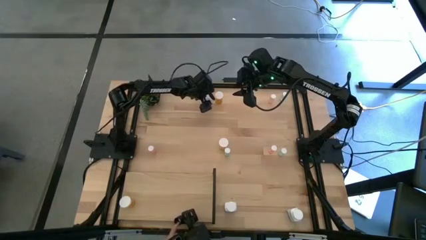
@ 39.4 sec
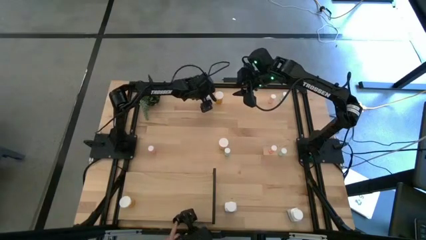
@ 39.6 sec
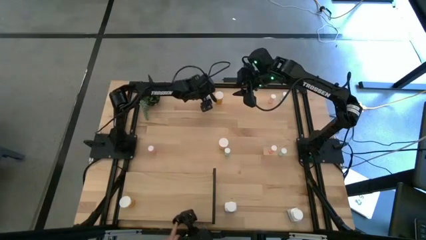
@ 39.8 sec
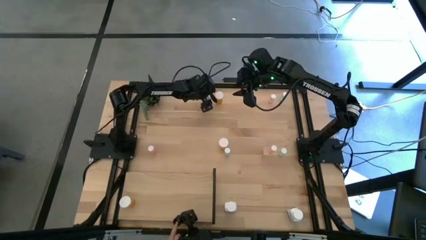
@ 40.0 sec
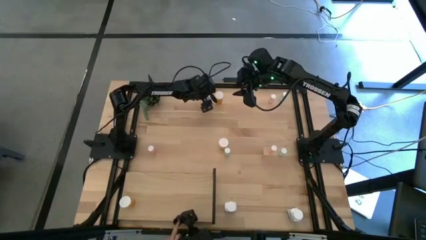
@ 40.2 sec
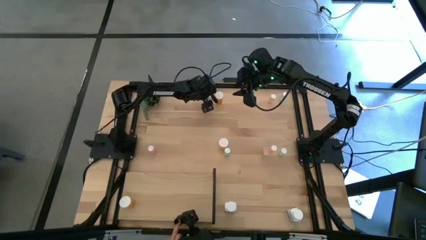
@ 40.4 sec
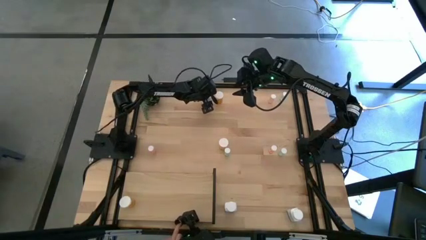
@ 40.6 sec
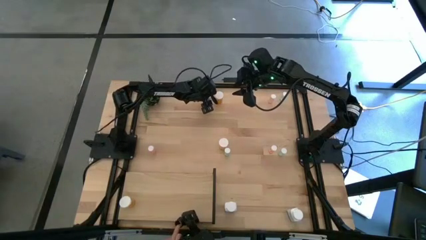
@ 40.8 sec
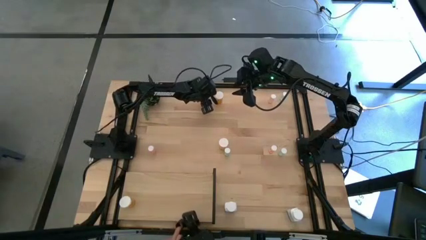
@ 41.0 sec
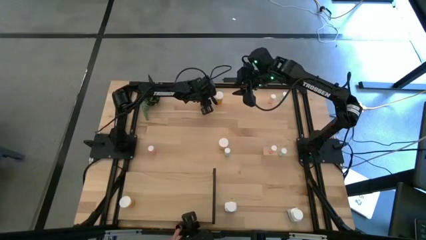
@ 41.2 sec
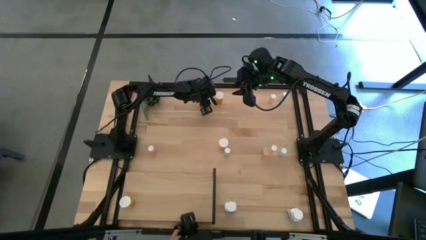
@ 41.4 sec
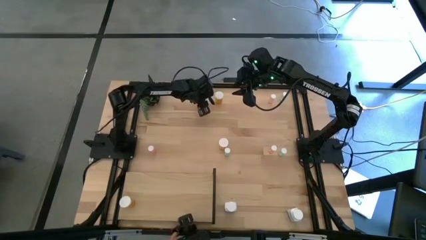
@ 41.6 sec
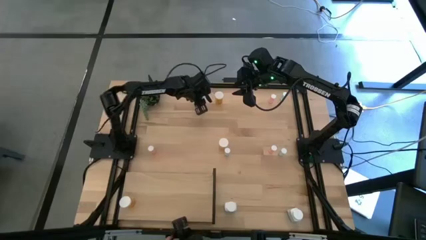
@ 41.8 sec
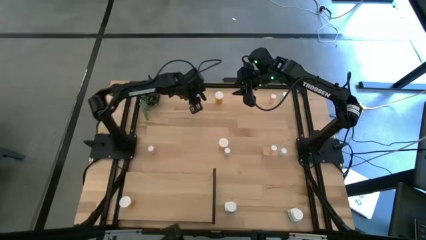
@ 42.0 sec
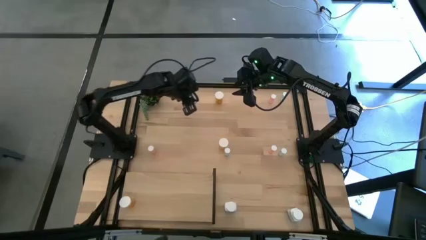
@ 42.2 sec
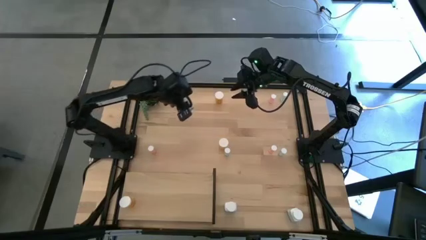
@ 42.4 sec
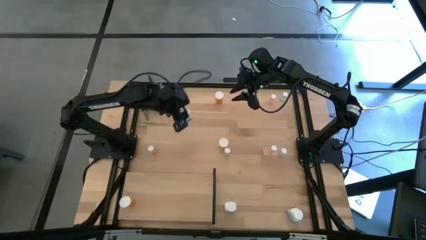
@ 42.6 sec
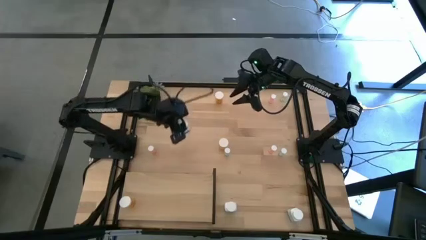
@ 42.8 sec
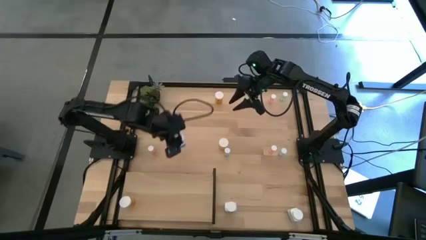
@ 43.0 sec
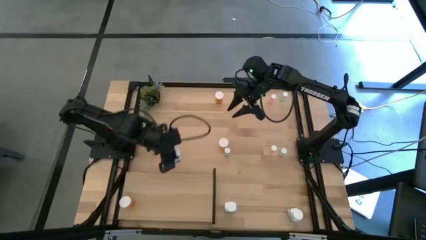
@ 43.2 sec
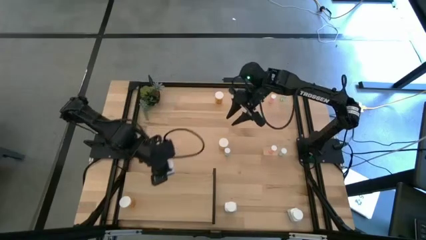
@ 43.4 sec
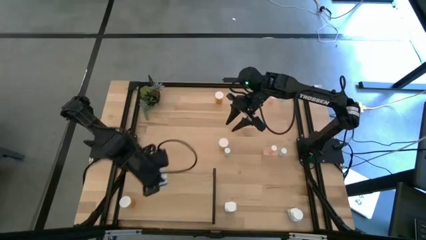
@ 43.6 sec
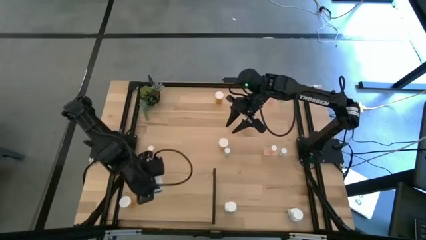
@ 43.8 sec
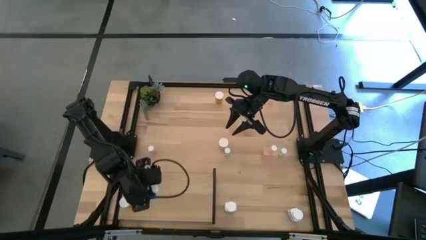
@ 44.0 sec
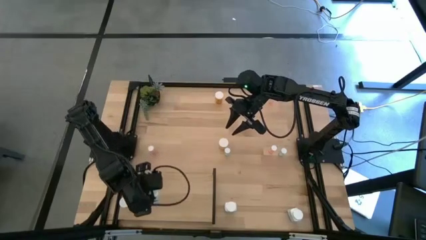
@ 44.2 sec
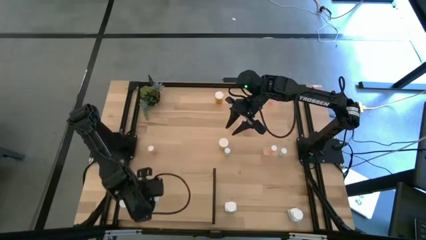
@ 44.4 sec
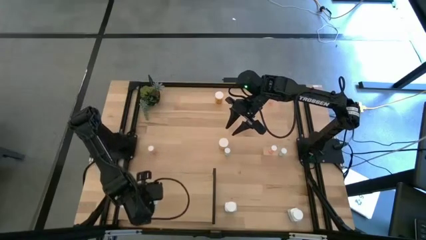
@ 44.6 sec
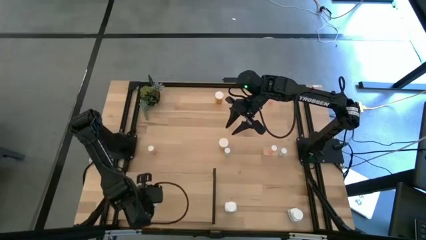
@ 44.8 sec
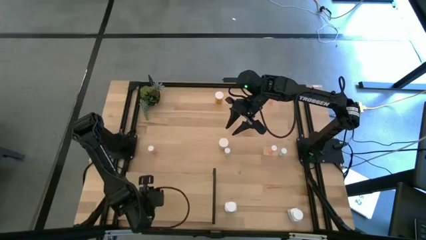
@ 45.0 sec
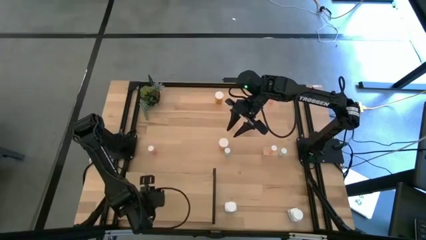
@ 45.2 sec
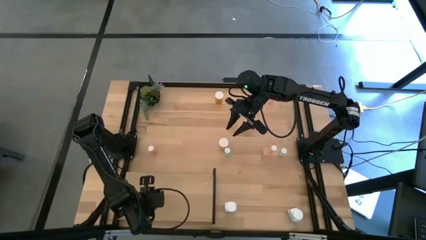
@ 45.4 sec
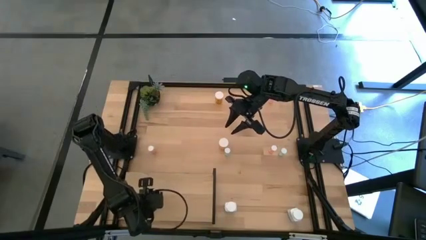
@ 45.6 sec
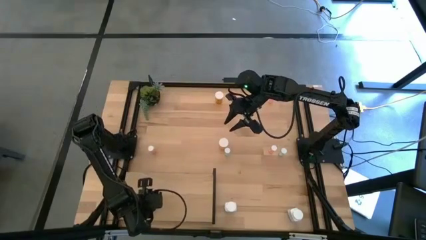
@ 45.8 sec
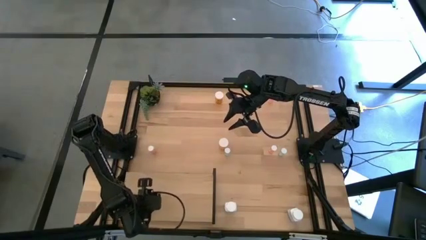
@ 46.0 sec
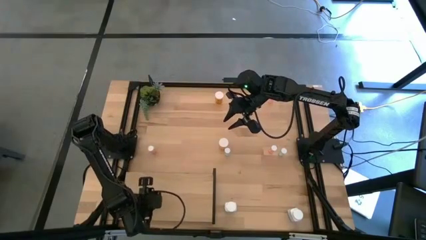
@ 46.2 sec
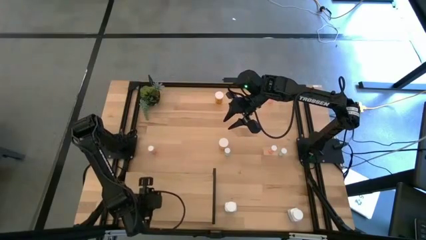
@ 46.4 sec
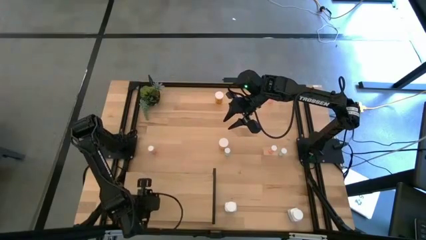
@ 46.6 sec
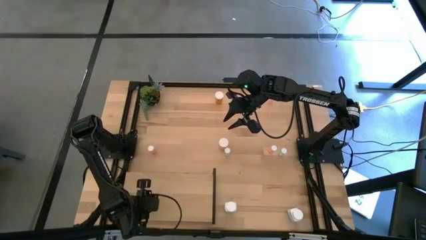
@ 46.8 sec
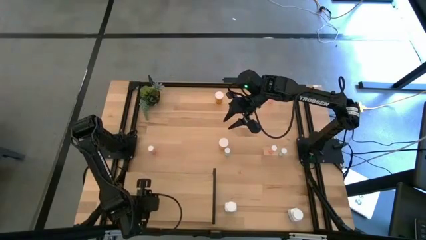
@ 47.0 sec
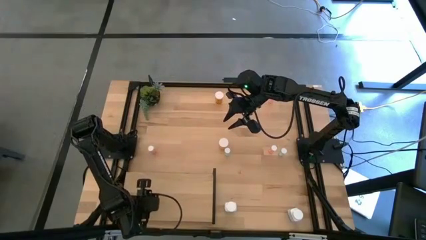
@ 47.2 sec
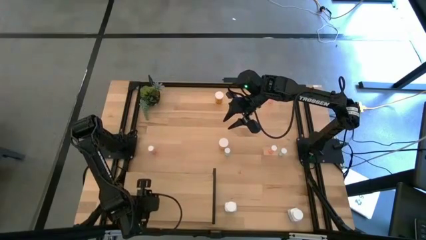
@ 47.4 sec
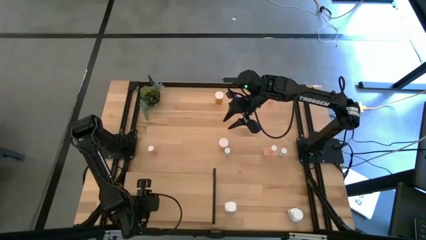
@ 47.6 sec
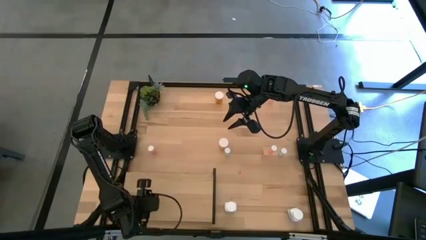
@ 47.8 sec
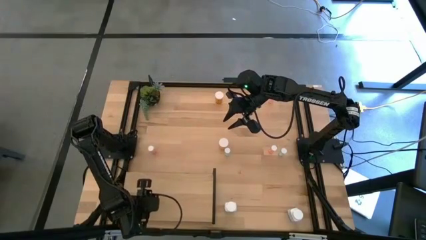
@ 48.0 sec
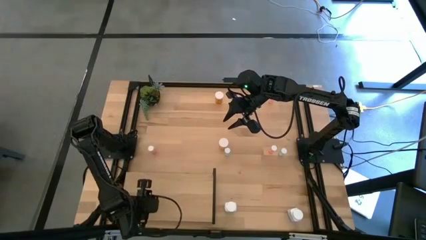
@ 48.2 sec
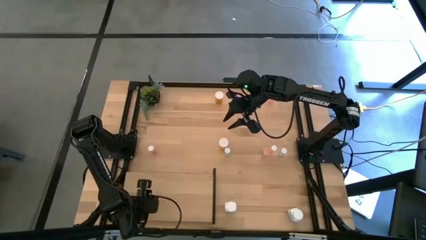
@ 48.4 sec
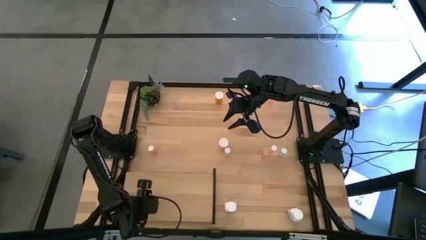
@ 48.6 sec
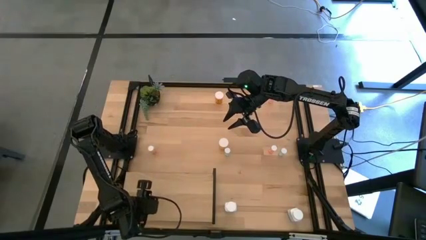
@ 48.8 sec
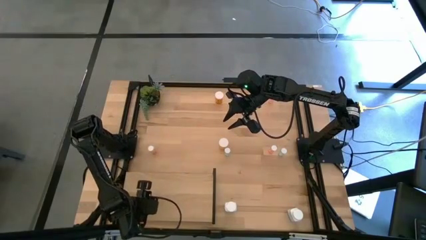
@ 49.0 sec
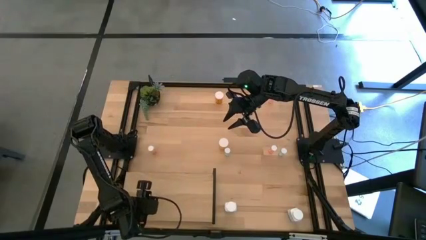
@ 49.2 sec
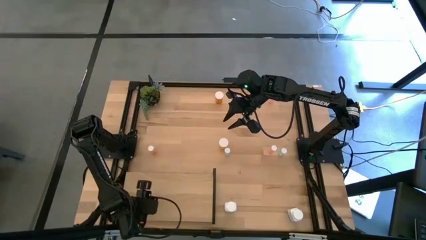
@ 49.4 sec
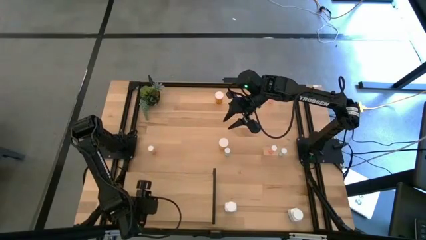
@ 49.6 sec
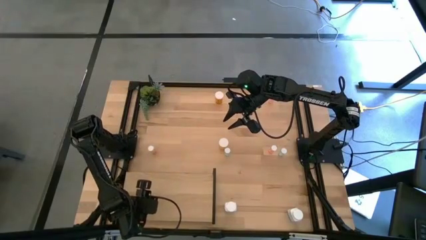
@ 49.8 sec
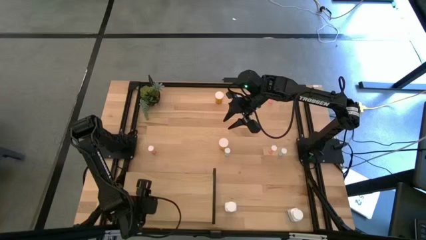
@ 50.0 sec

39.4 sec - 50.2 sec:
Task: Pick and place medicine bottles onto shelf by color
Put the top big white pill bottle on the shelf
